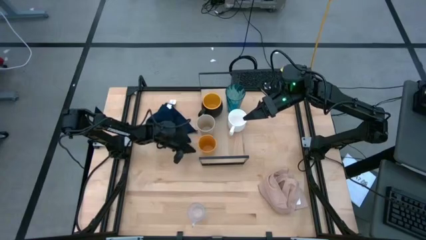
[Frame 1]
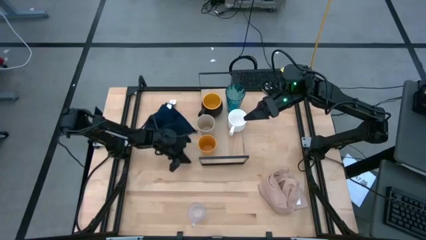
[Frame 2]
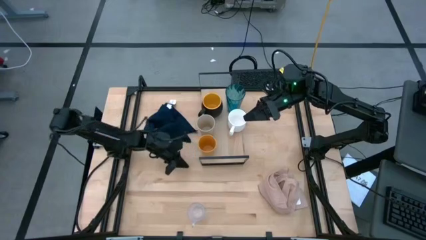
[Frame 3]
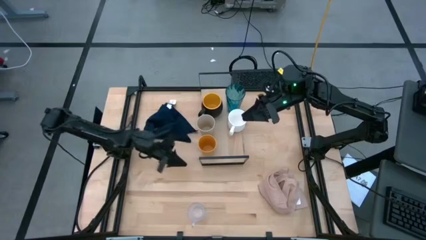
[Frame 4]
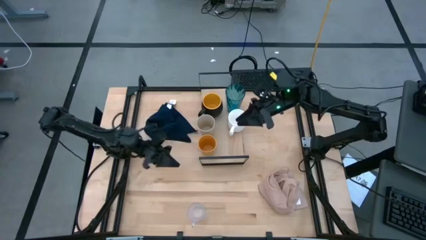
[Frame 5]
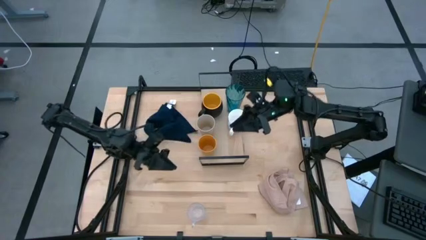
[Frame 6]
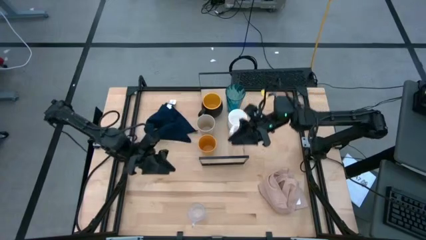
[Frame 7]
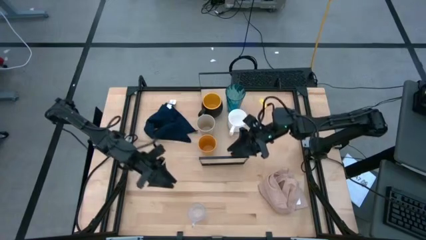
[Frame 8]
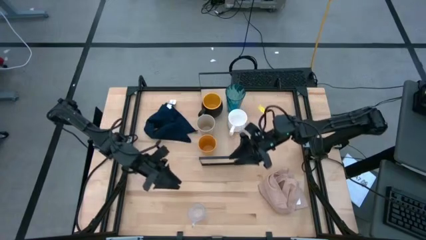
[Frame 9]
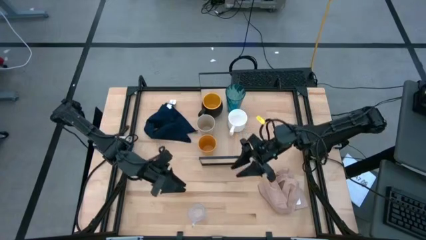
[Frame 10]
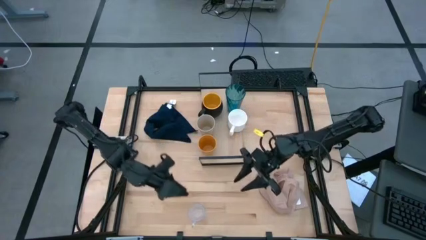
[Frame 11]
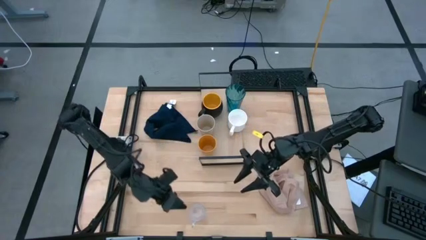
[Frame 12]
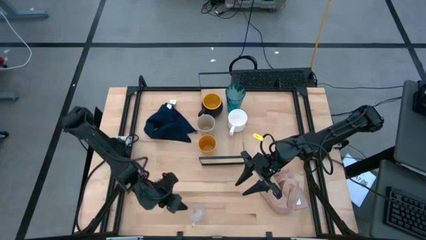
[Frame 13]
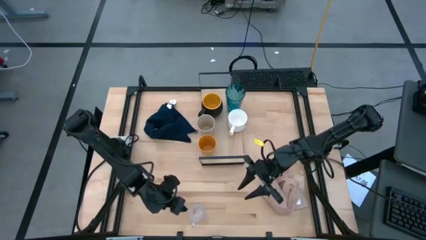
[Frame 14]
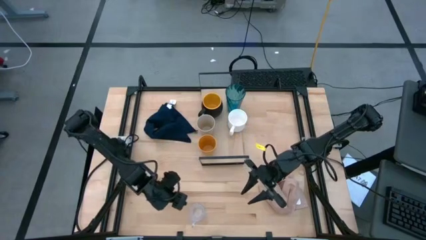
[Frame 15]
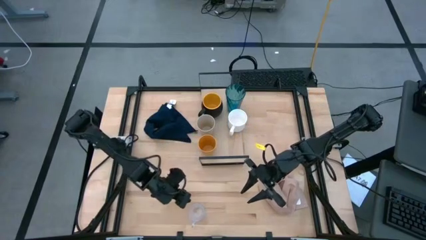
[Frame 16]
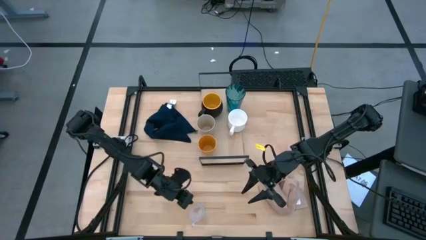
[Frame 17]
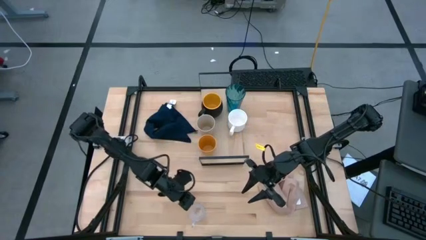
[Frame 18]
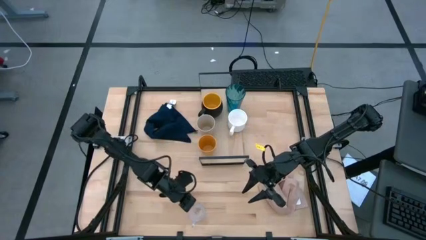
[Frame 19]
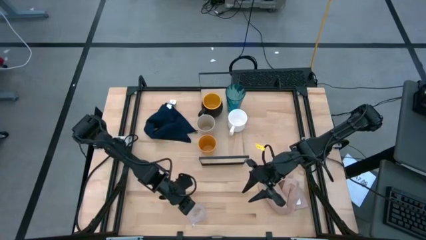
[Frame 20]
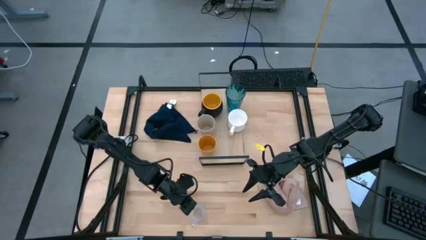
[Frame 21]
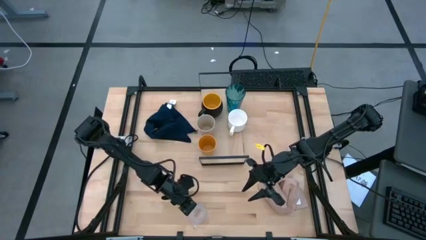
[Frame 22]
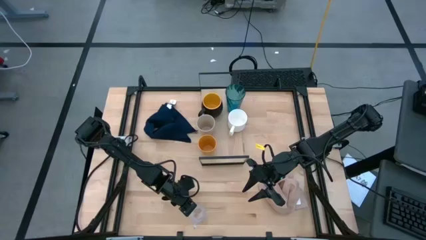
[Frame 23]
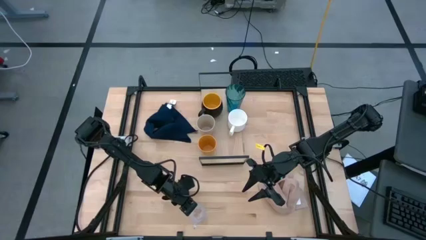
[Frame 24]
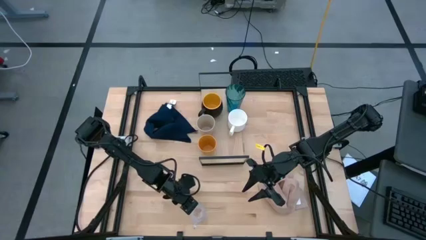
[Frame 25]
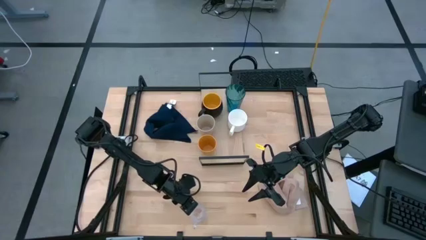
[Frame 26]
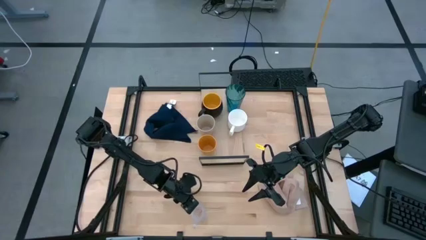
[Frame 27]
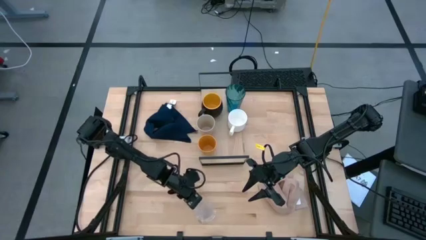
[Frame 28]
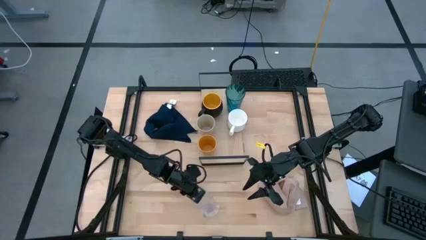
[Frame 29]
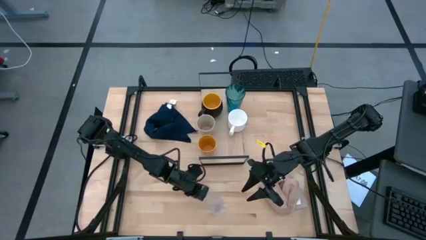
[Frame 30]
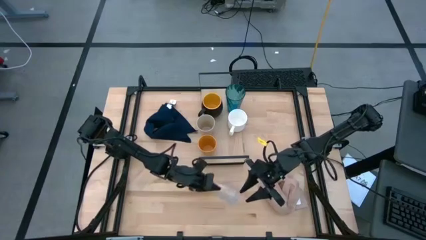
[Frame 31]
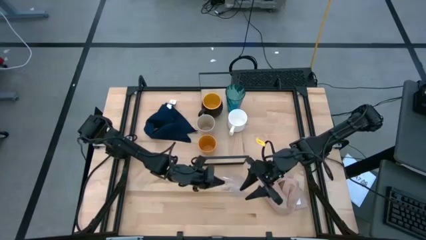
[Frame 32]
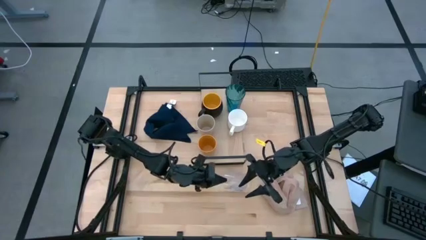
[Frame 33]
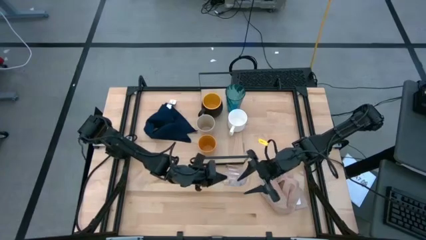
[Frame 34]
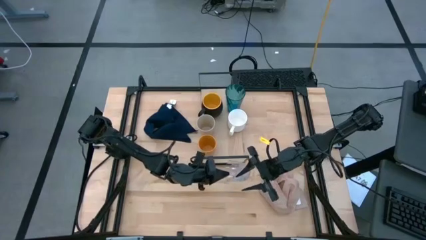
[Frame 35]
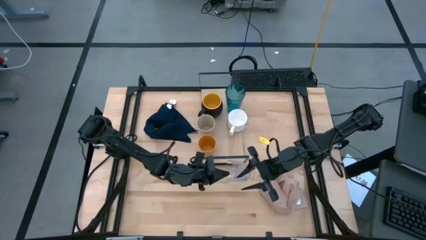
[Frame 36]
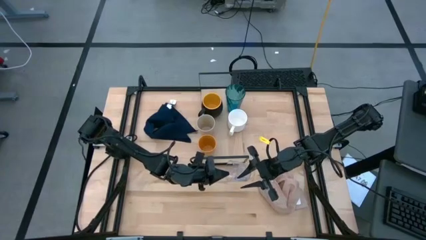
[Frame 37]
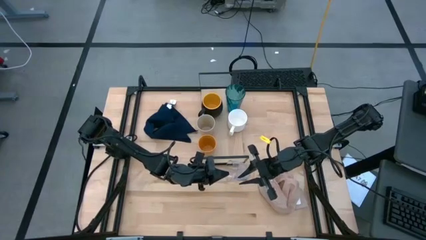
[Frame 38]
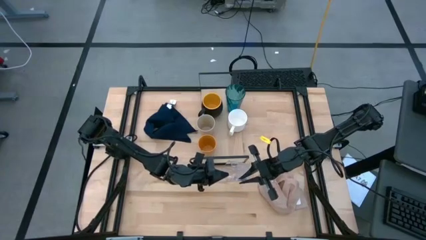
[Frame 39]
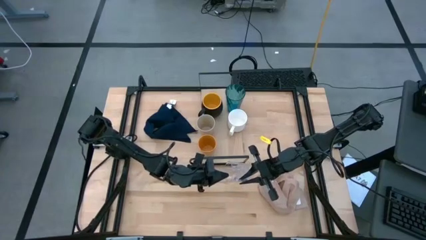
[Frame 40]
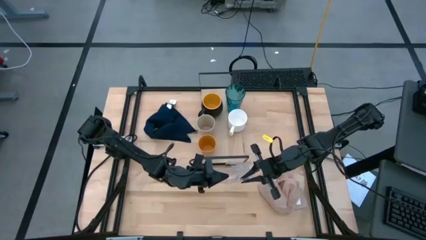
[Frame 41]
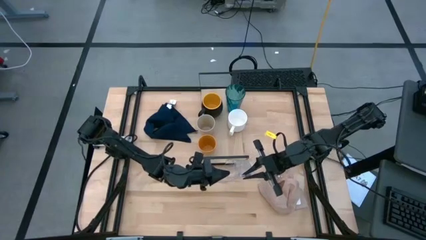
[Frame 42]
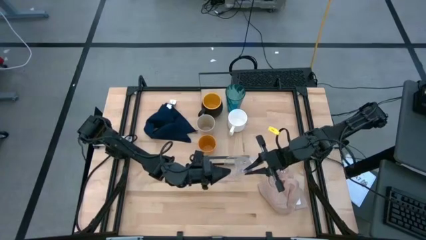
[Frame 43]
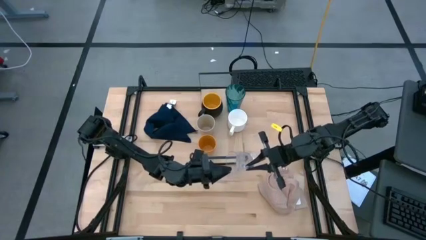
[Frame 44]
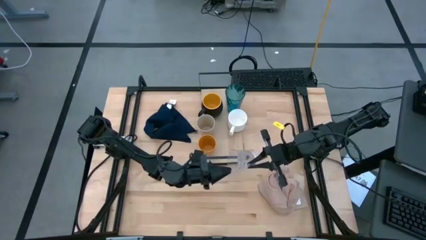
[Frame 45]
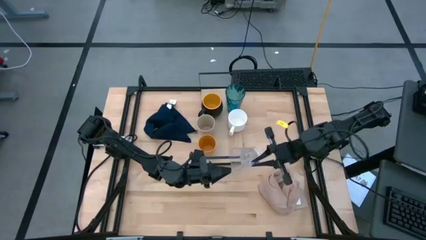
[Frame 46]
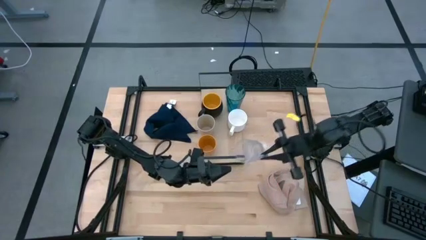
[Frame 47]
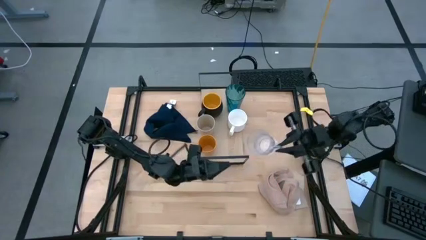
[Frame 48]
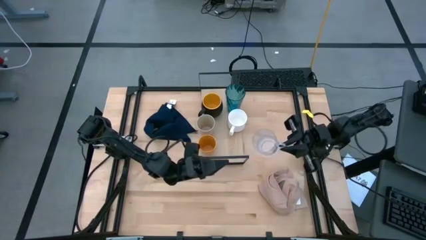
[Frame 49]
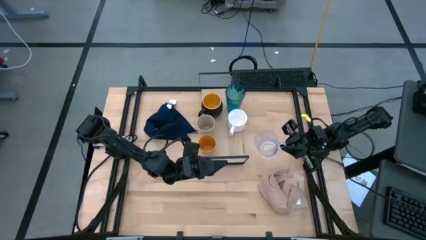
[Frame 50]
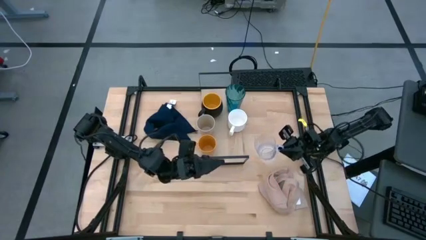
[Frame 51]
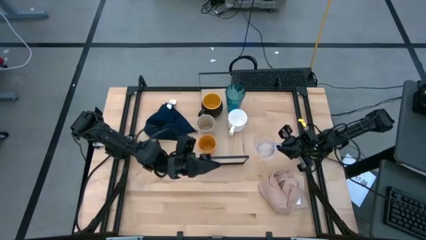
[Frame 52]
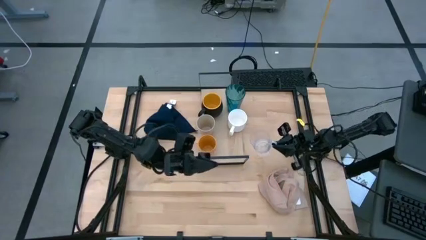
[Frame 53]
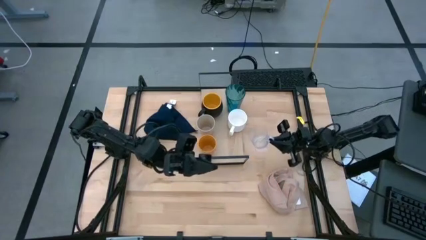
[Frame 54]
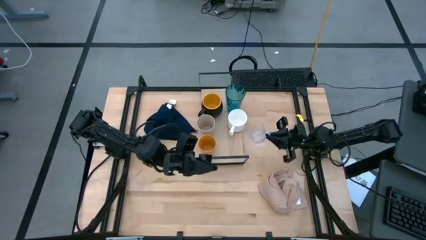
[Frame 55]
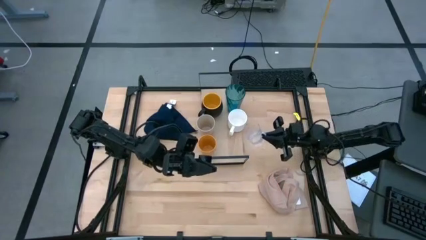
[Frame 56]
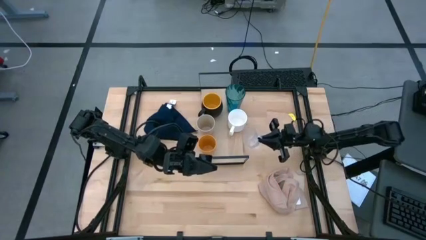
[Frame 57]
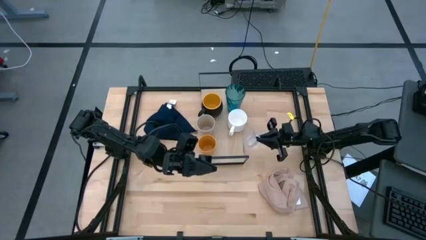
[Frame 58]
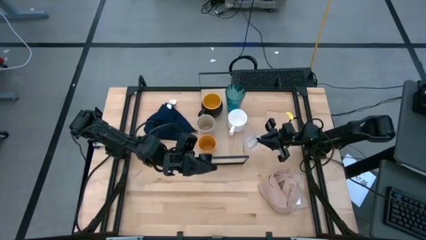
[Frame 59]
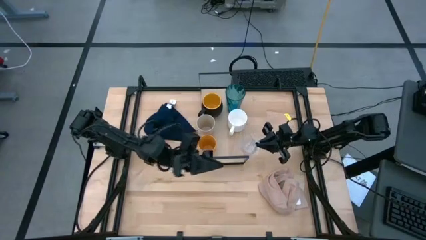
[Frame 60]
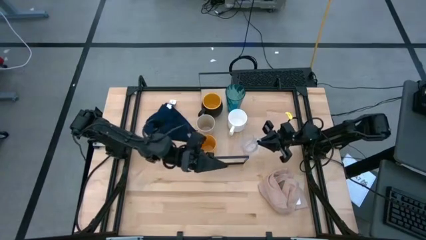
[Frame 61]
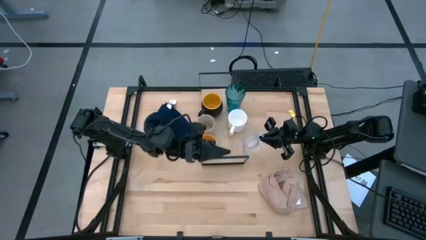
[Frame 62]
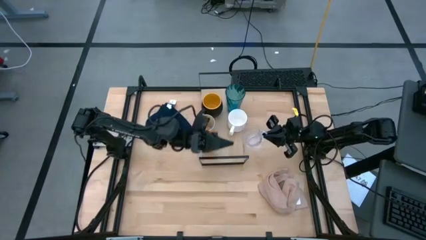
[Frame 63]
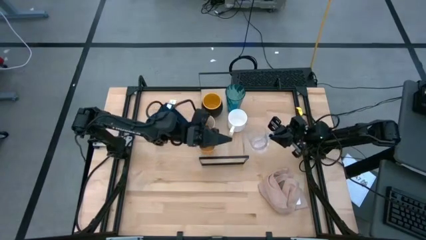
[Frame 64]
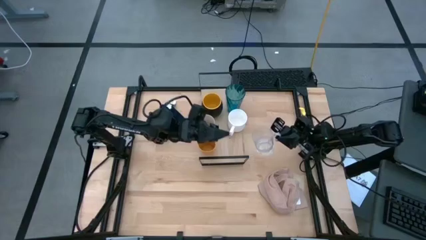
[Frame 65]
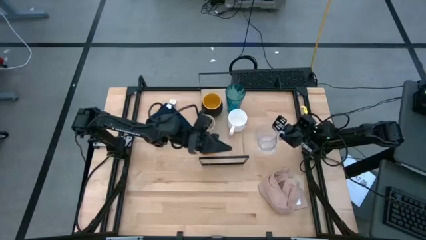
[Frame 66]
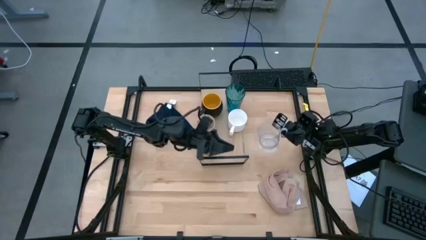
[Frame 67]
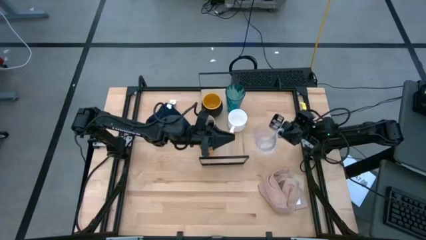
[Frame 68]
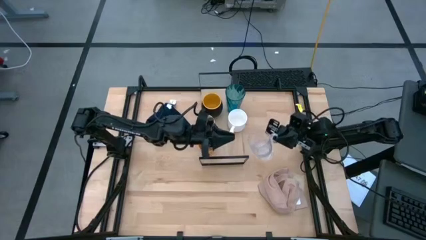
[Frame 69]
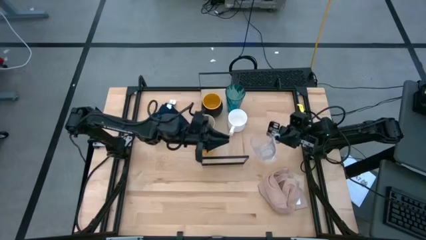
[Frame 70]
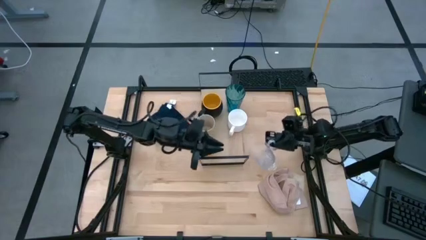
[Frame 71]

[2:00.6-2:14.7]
Task: Stack small to large cups/mugs on shelf
Put the transparent mug on the shelf

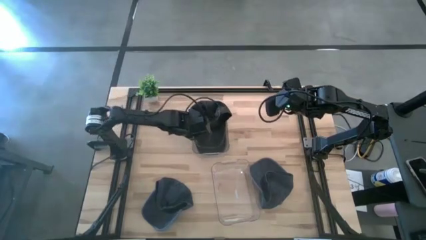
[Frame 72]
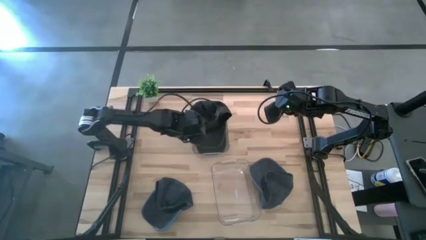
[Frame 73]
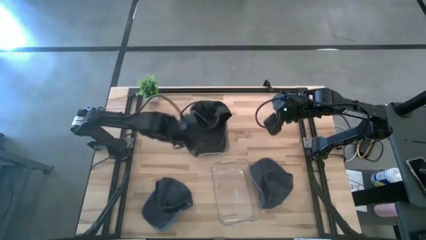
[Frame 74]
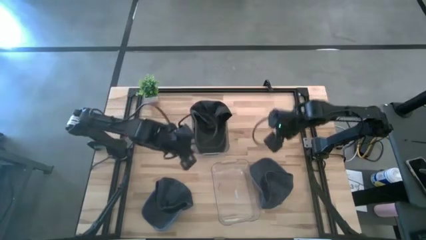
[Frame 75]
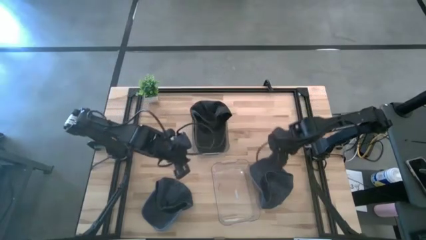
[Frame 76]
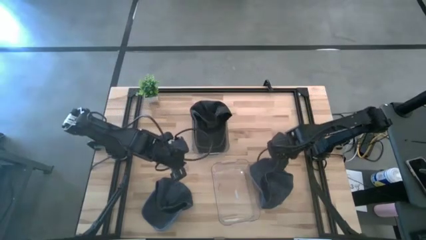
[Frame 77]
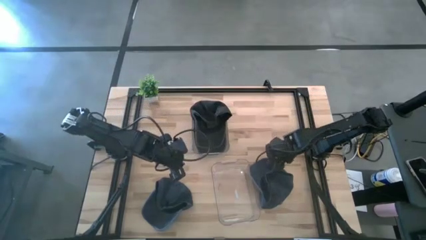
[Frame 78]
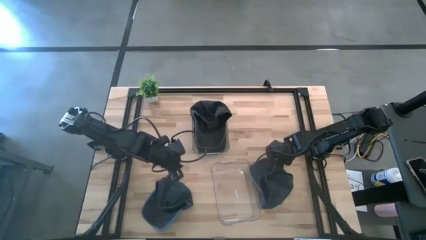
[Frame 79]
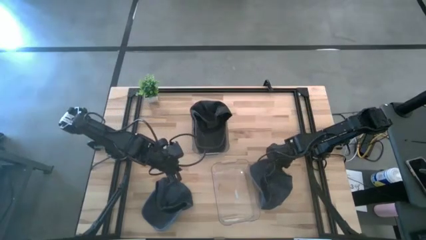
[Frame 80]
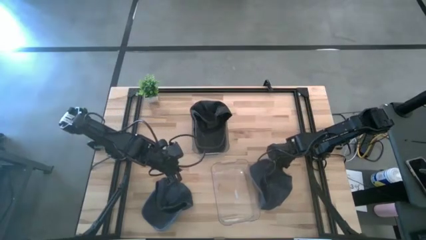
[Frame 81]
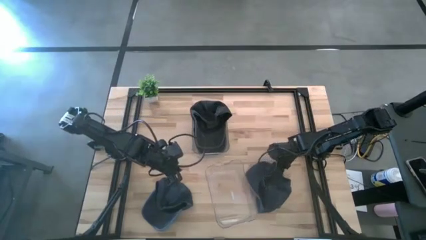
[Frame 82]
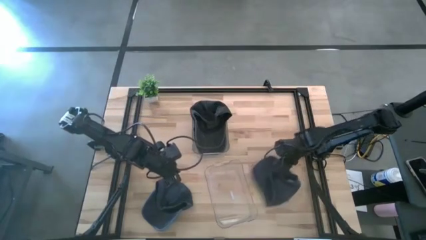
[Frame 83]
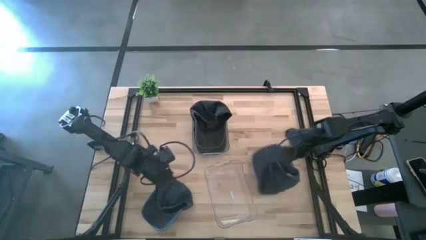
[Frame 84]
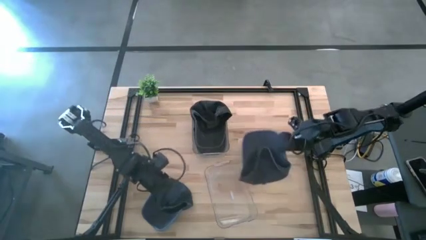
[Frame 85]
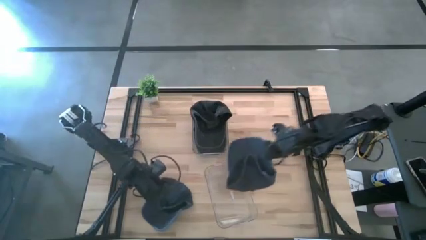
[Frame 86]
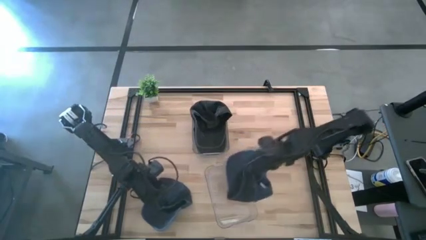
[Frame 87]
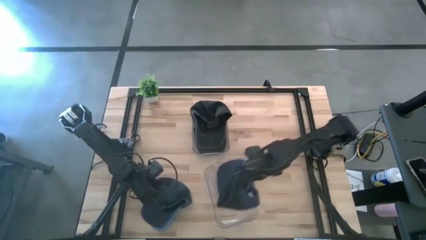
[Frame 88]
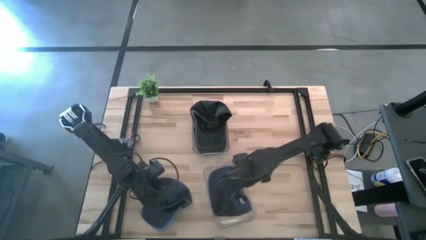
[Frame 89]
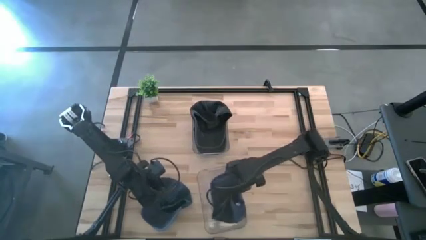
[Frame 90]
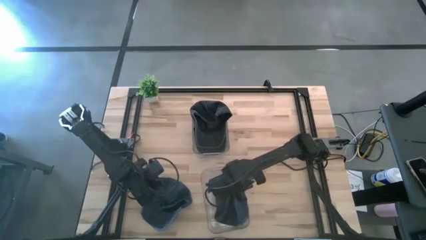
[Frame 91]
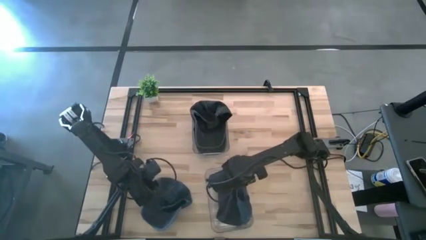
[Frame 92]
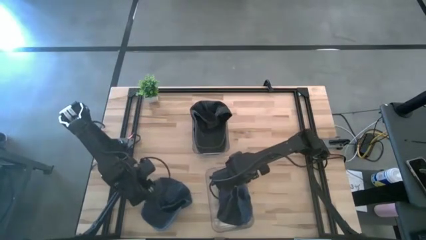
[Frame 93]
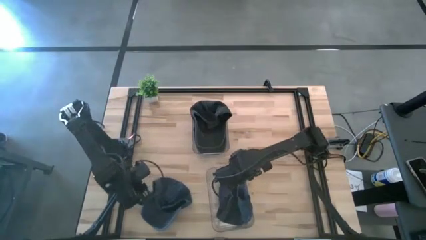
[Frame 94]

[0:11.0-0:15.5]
Task: Pick & Place hat
Put the right gray cap into the bottom transparent bin
